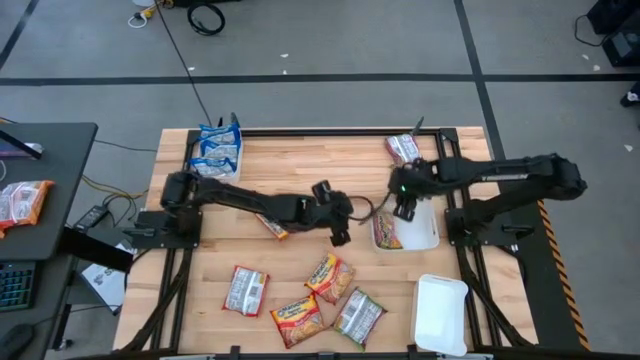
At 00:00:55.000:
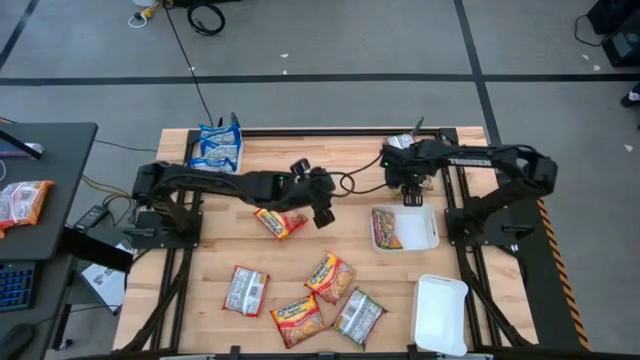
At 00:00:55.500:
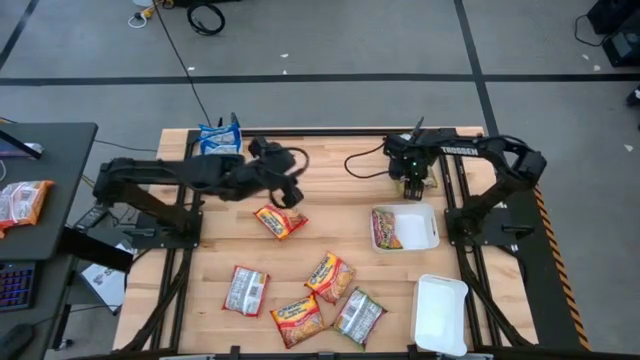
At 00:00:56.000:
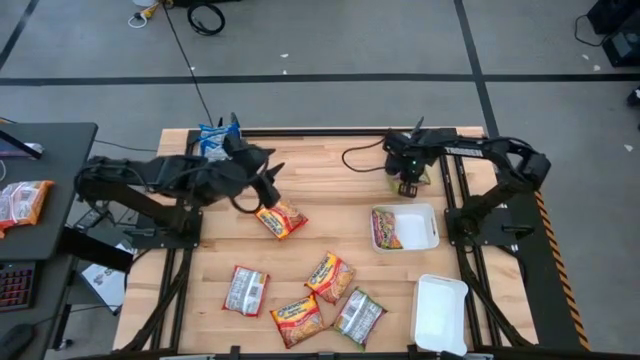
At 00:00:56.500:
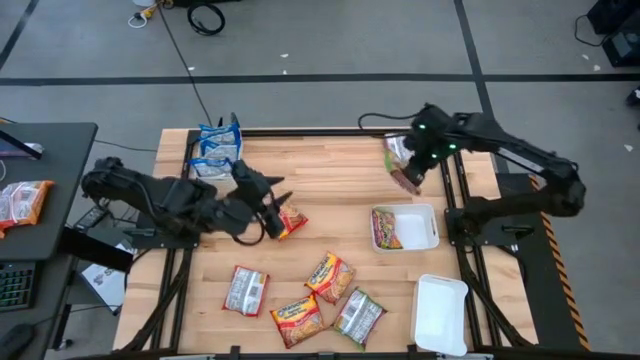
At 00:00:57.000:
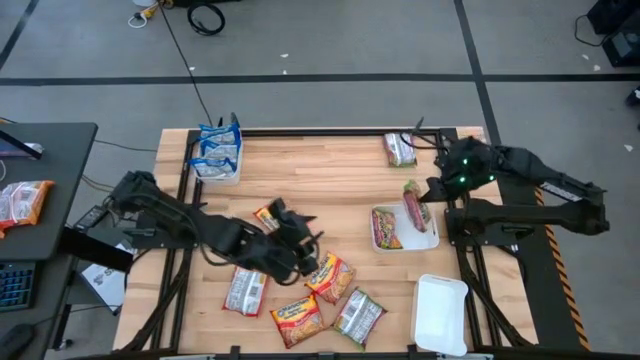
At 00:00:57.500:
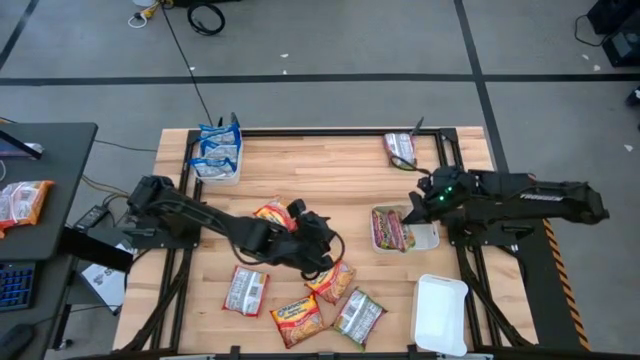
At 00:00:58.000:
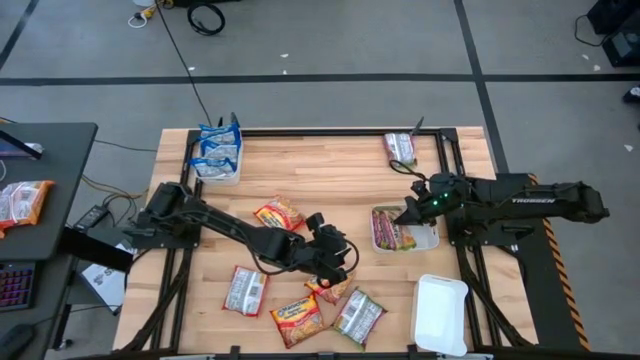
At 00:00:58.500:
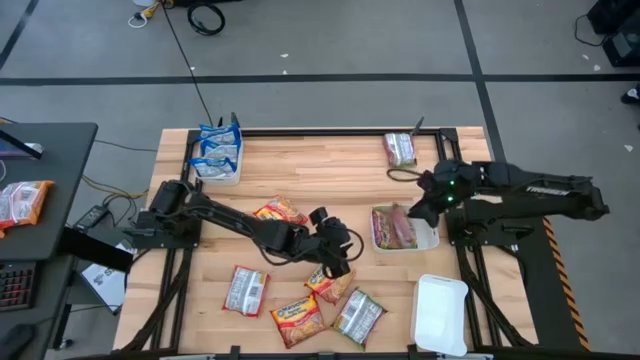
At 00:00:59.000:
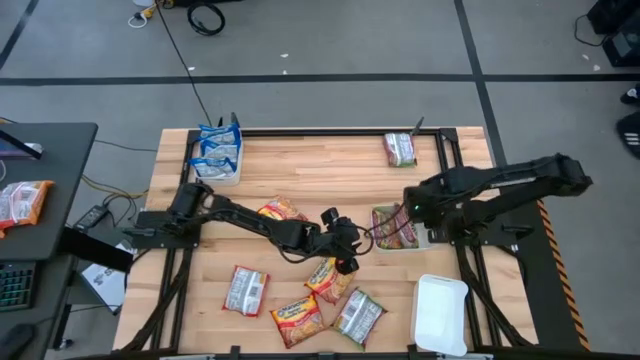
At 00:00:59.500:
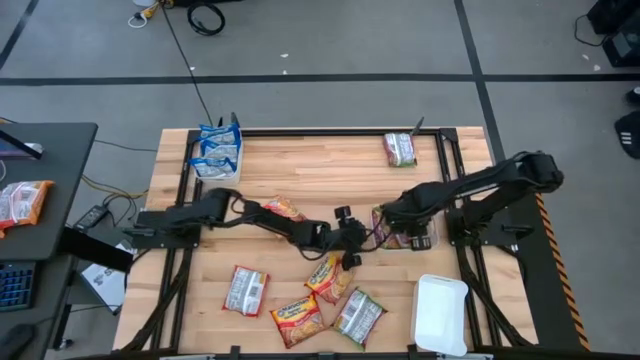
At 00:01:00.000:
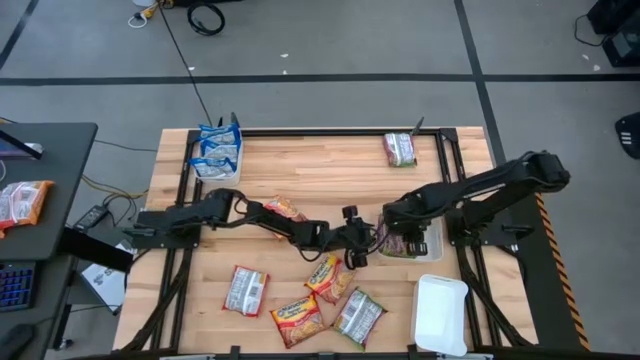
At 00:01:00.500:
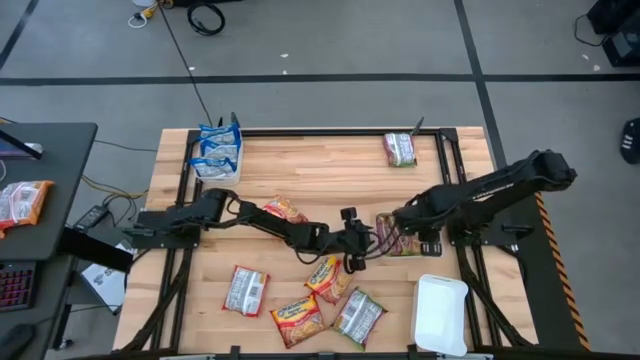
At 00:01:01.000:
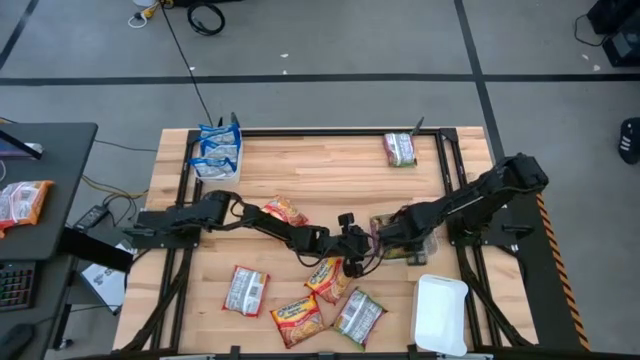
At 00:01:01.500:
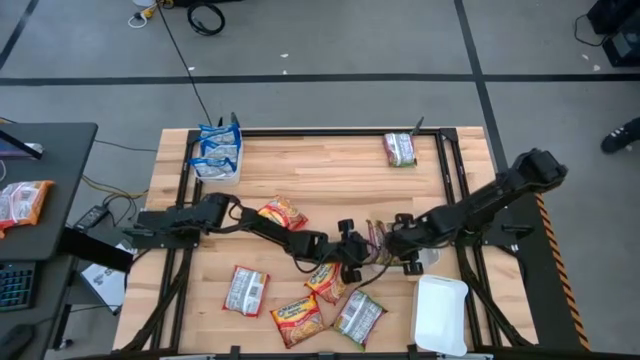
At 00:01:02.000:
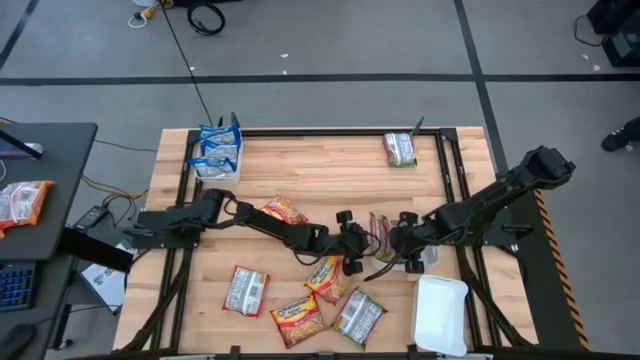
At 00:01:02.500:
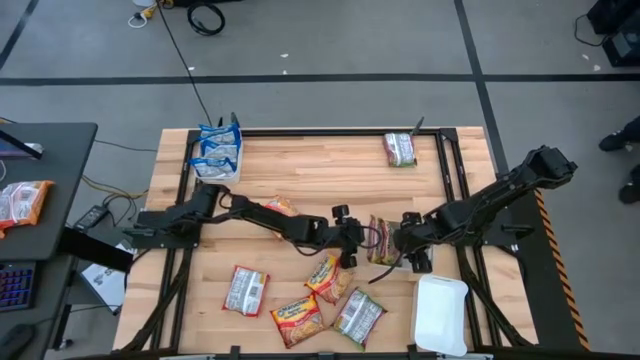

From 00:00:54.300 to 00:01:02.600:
Task: Sort Maruchan noodles
Put the green noodle pack into the middle right white bin

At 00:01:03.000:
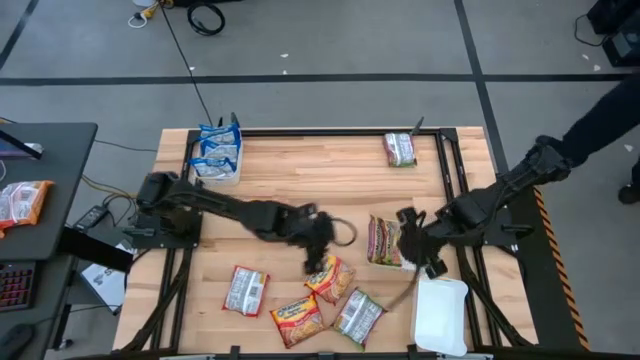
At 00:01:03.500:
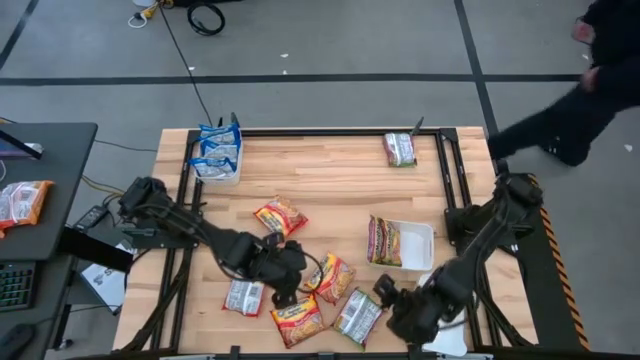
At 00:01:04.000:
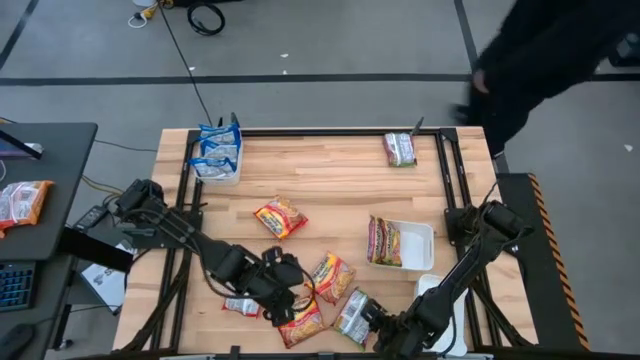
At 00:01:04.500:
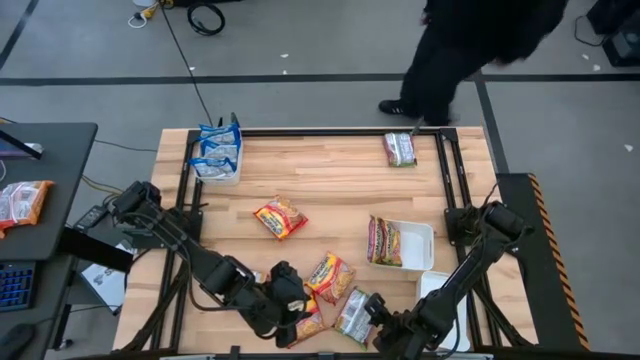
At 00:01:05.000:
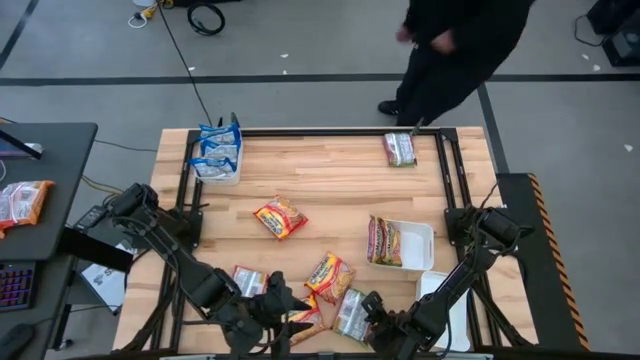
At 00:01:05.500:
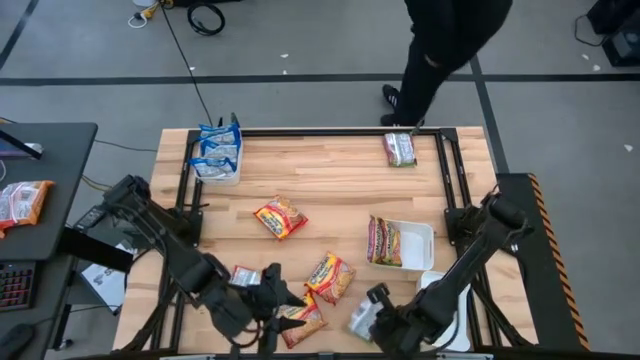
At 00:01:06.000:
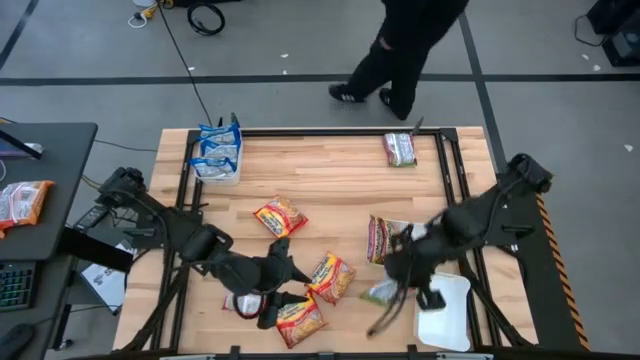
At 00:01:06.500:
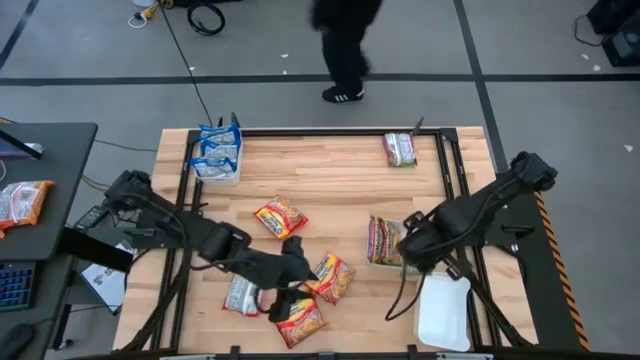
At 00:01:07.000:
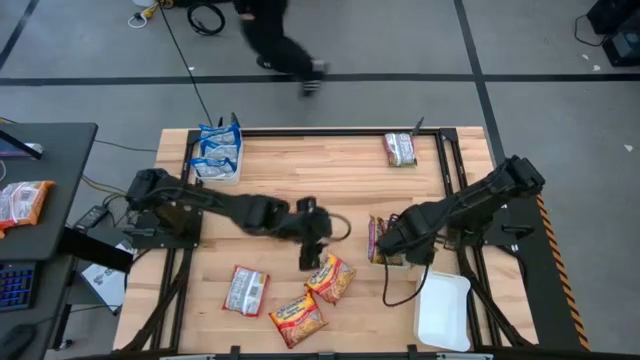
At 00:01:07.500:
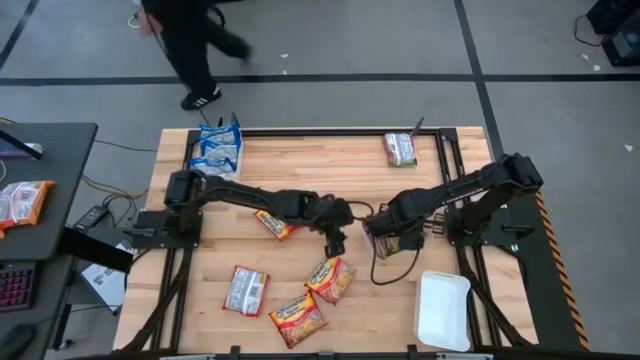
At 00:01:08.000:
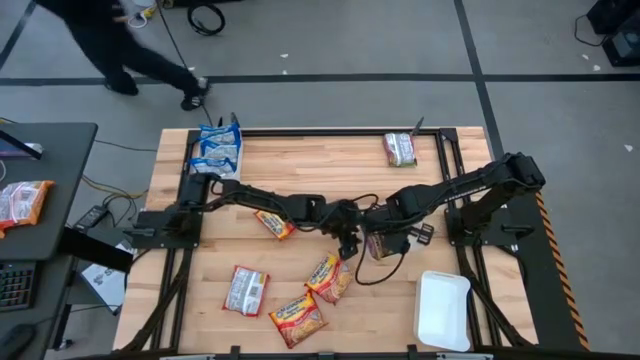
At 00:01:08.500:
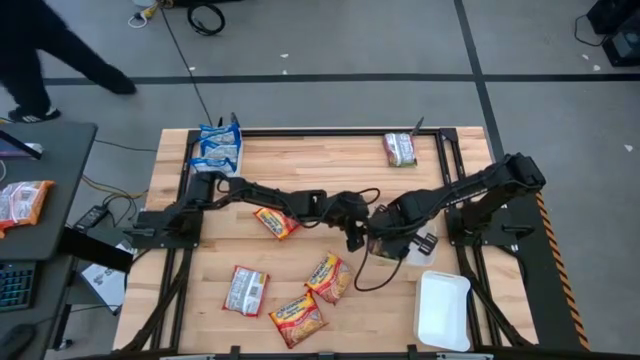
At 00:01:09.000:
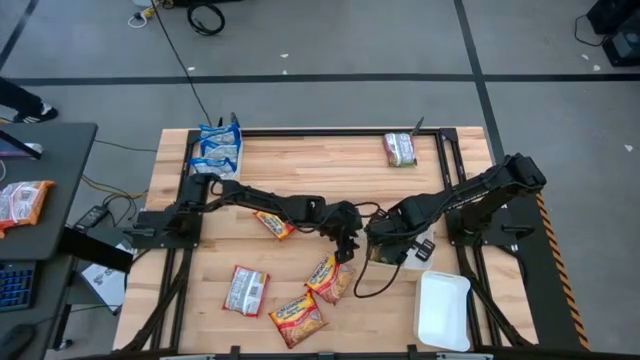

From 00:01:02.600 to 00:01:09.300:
Put the green noodle pack into the middle right white bin

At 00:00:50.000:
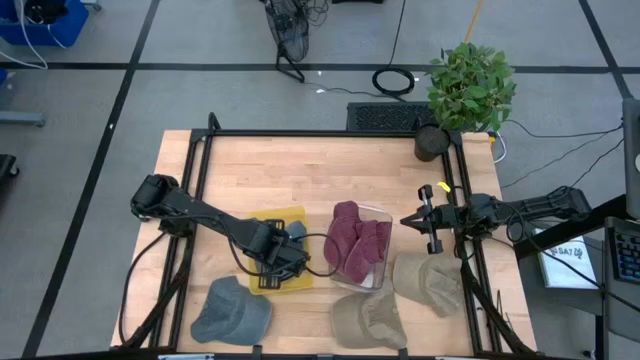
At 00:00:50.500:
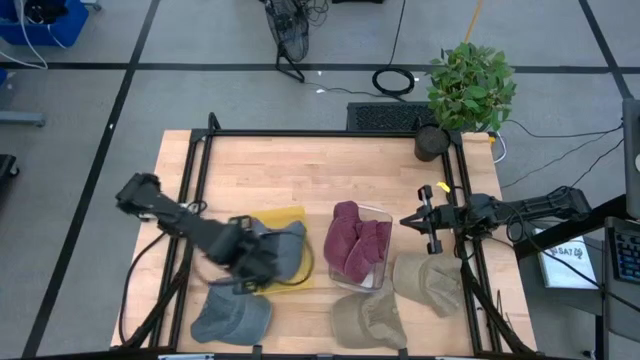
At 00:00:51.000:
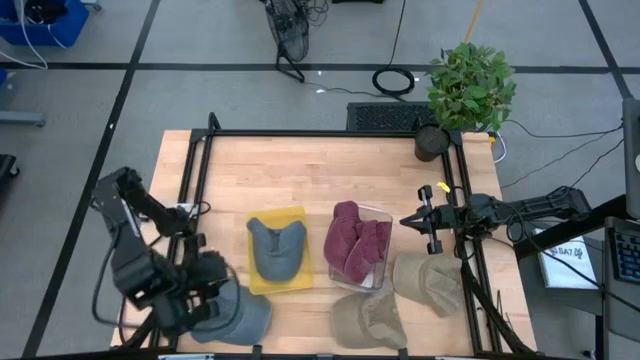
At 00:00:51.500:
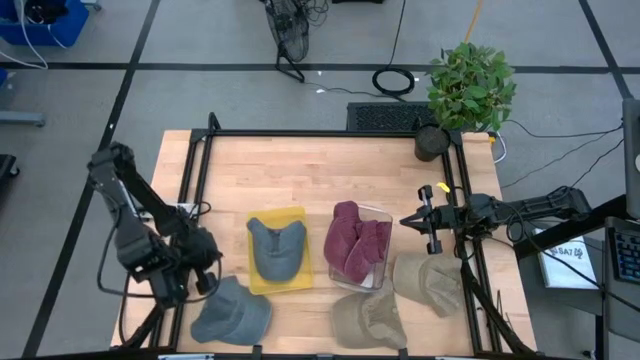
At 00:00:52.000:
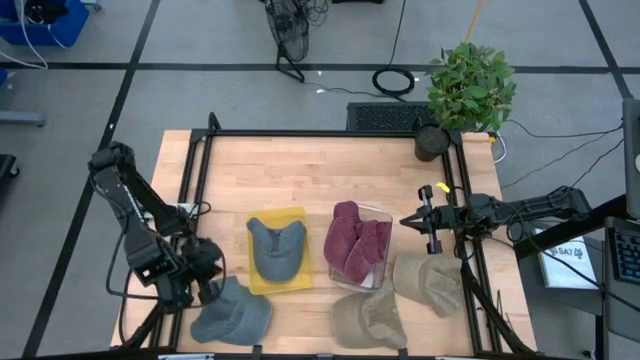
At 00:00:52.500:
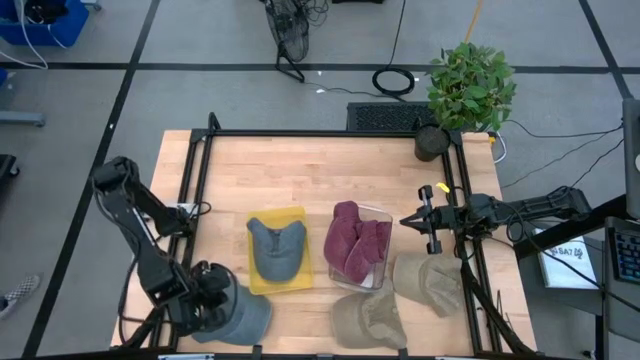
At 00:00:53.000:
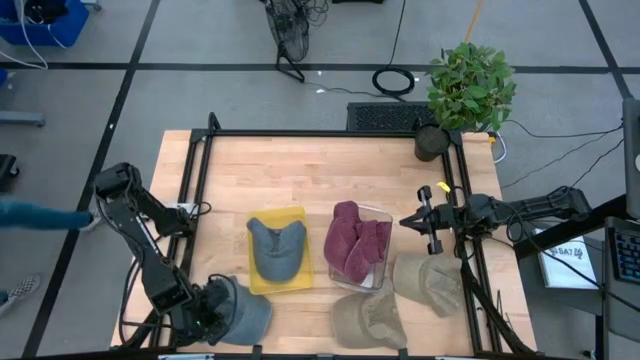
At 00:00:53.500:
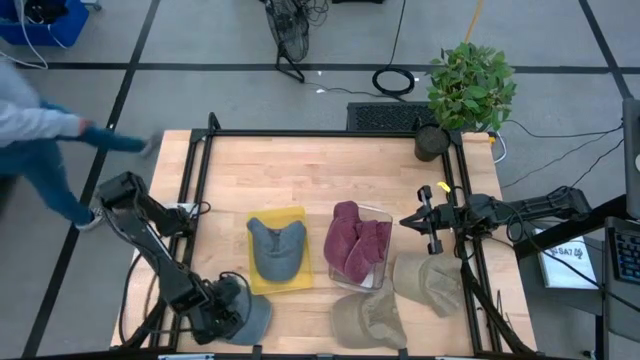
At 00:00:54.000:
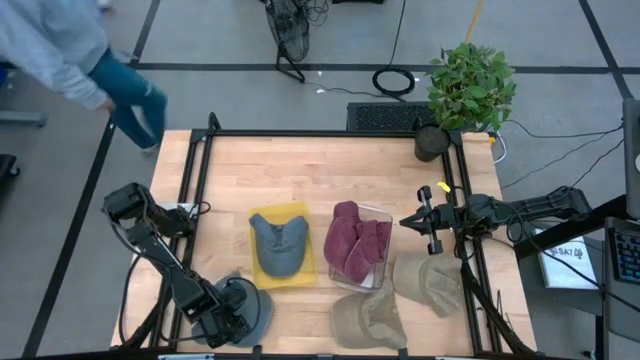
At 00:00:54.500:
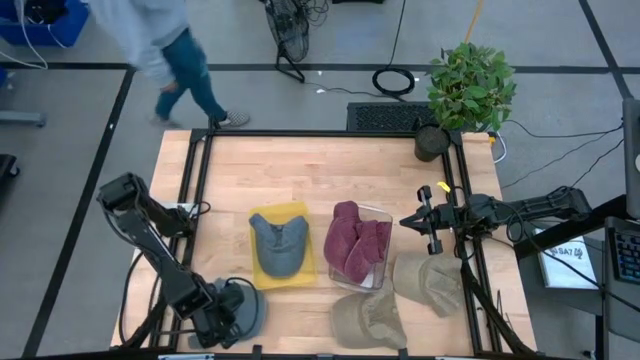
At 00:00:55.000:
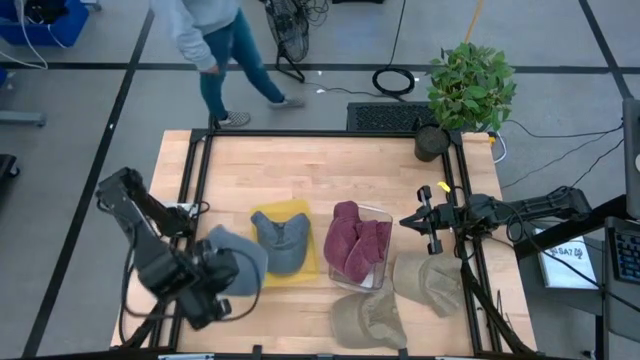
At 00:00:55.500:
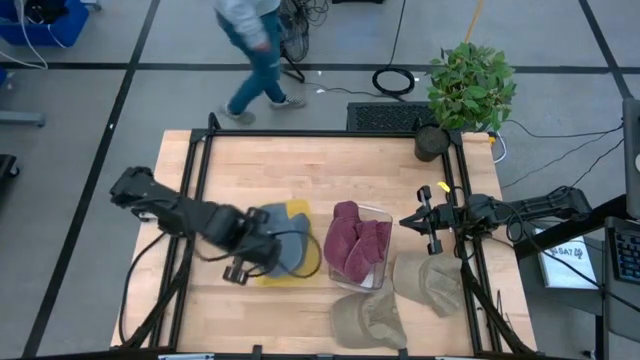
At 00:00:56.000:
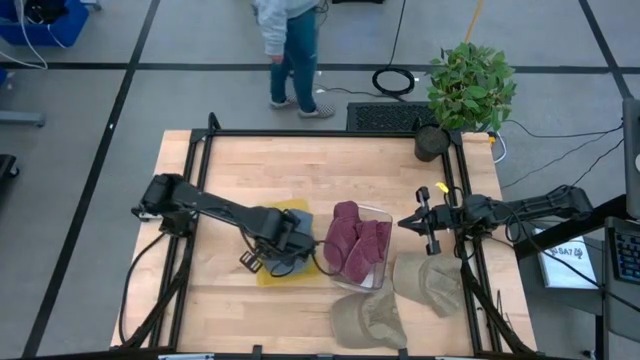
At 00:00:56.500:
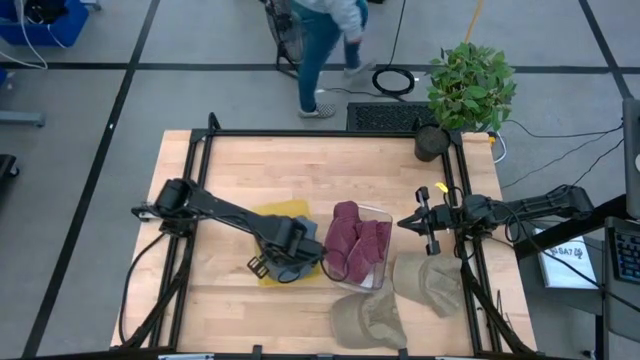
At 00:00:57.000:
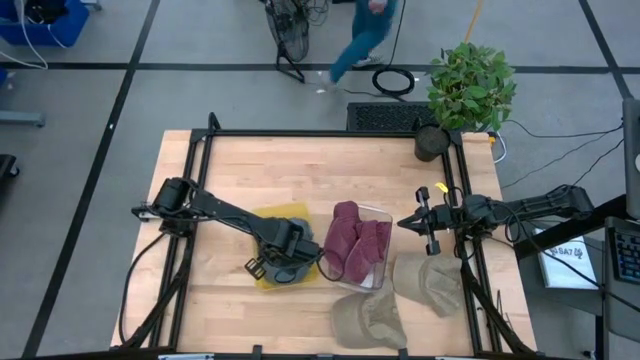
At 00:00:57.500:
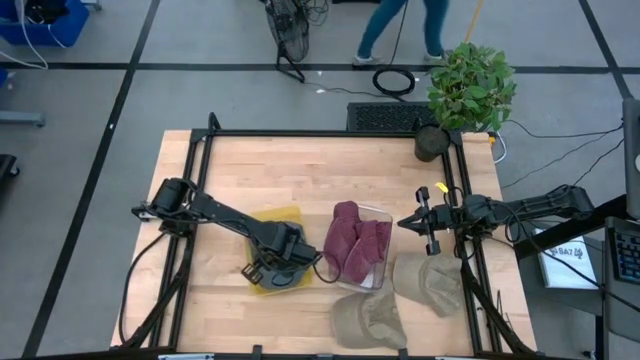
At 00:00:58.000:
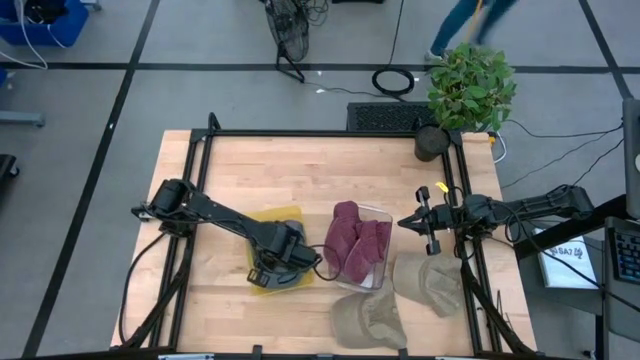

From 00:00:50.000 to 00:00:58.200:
Task: Pick & Place hat
Put the blue cap into the yellow bin
